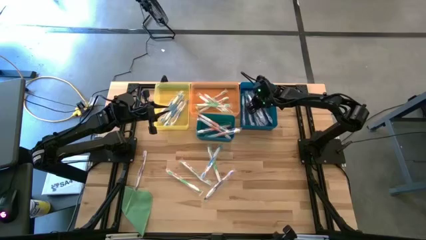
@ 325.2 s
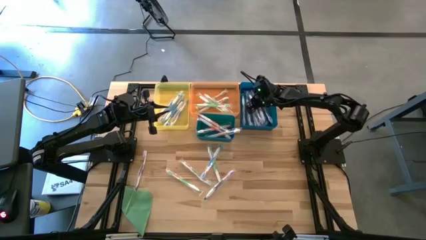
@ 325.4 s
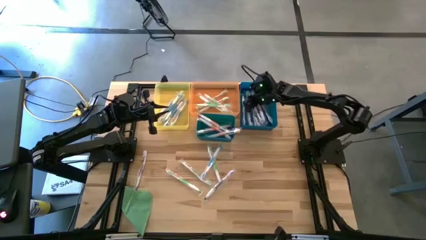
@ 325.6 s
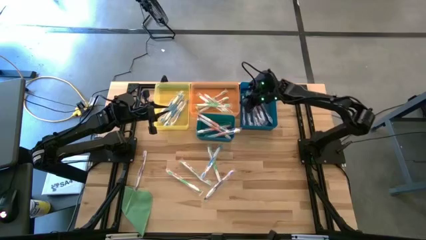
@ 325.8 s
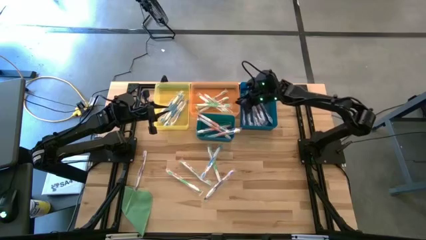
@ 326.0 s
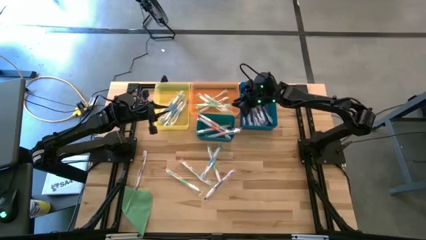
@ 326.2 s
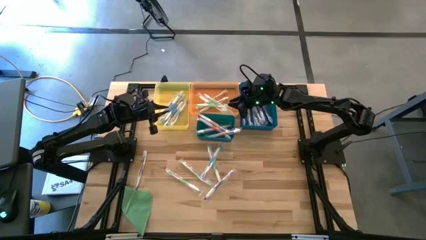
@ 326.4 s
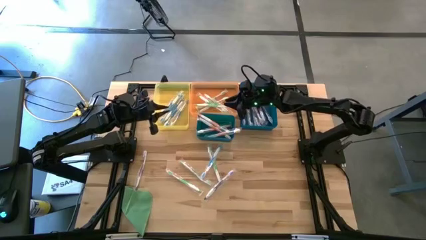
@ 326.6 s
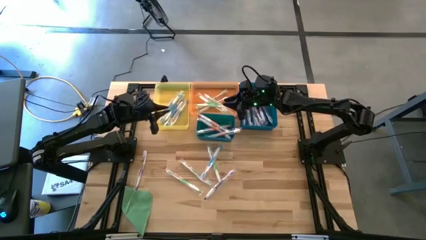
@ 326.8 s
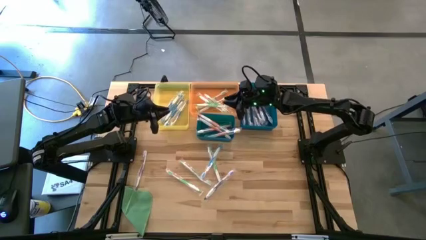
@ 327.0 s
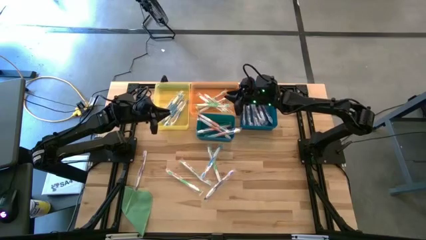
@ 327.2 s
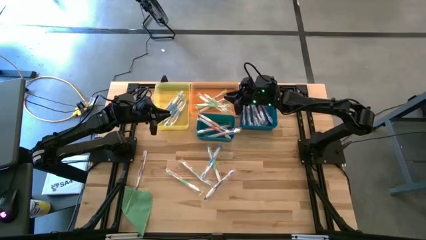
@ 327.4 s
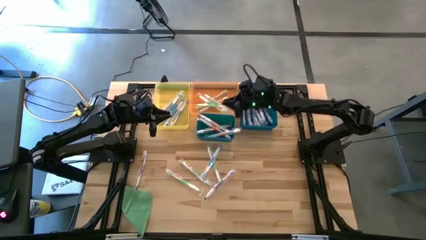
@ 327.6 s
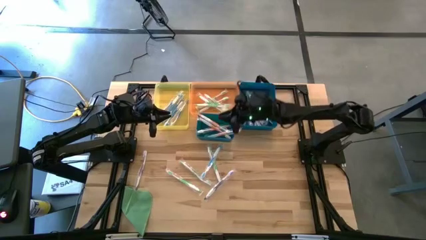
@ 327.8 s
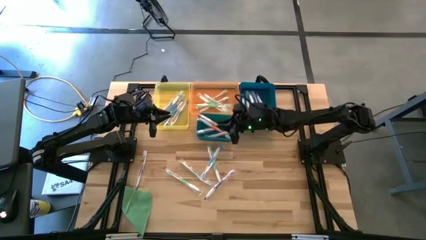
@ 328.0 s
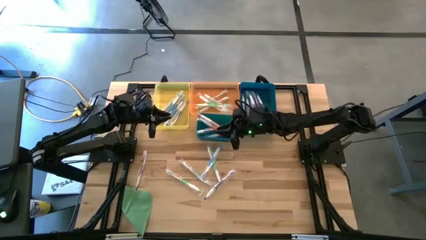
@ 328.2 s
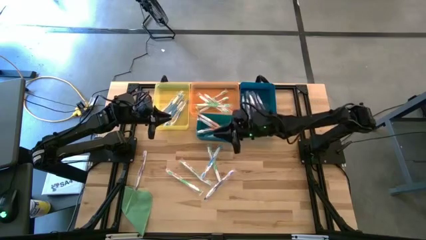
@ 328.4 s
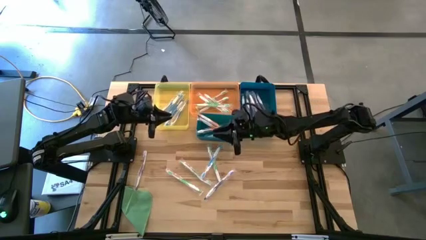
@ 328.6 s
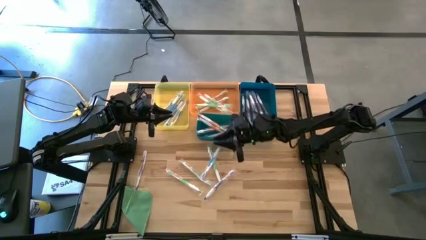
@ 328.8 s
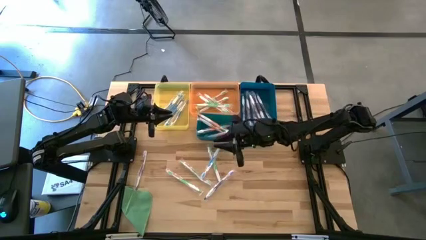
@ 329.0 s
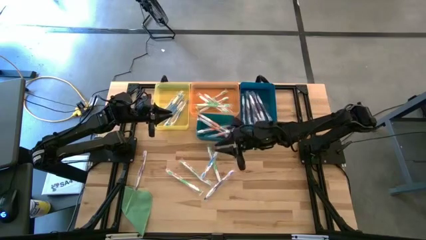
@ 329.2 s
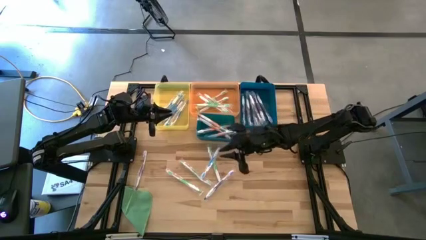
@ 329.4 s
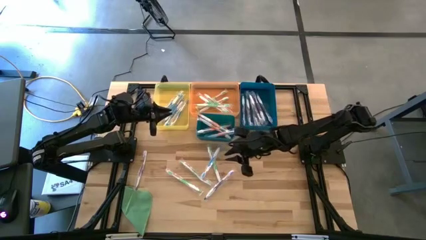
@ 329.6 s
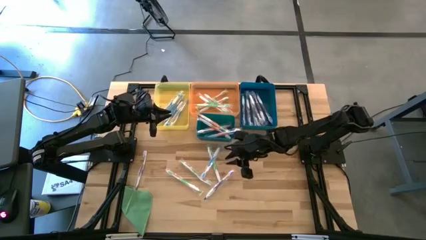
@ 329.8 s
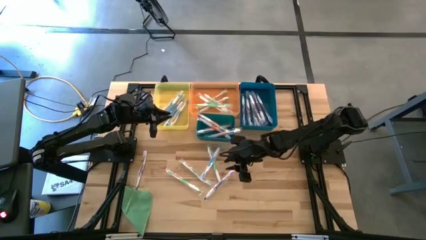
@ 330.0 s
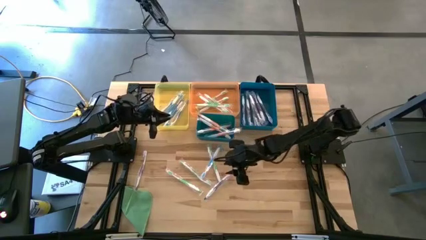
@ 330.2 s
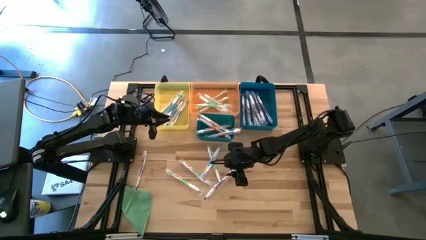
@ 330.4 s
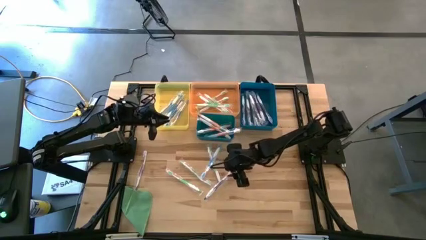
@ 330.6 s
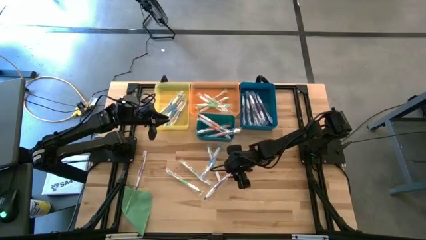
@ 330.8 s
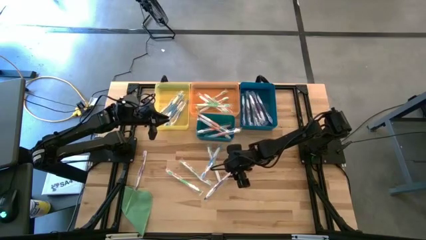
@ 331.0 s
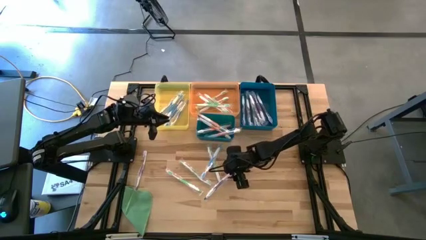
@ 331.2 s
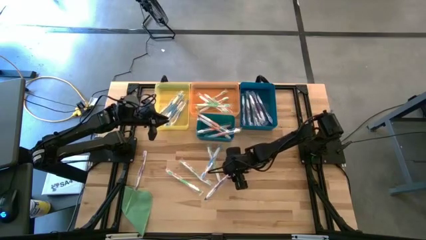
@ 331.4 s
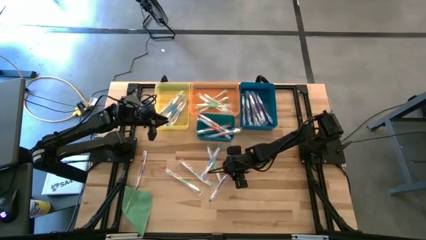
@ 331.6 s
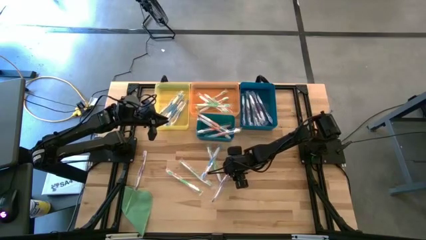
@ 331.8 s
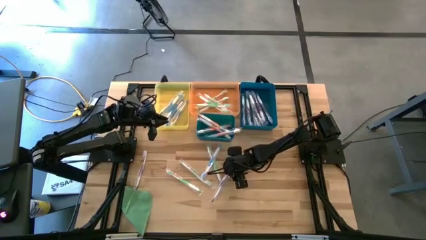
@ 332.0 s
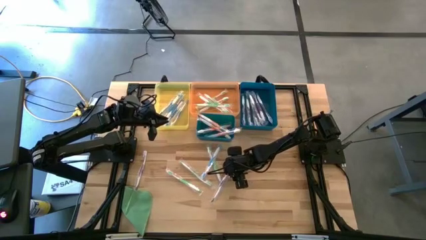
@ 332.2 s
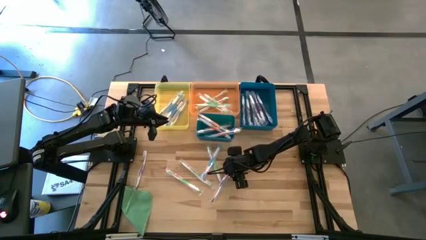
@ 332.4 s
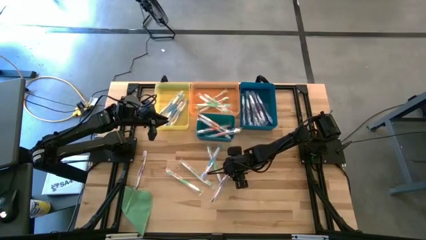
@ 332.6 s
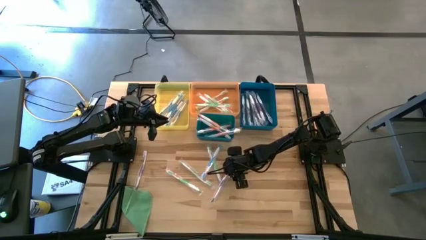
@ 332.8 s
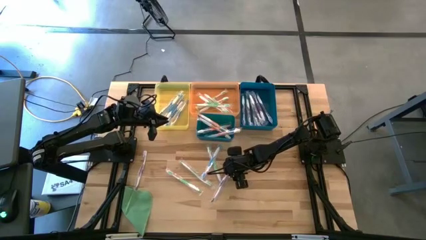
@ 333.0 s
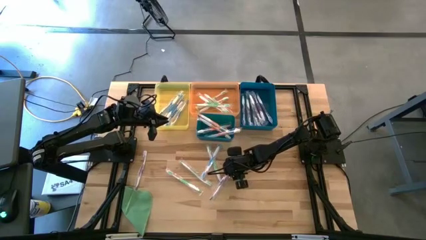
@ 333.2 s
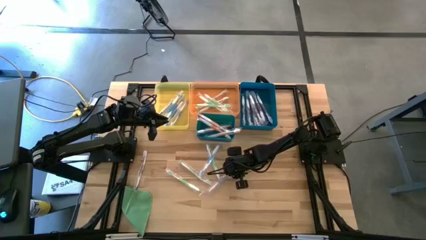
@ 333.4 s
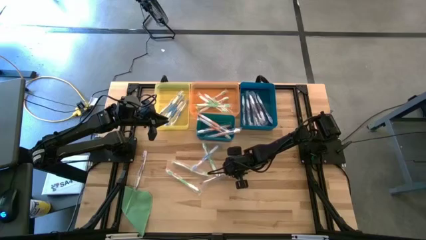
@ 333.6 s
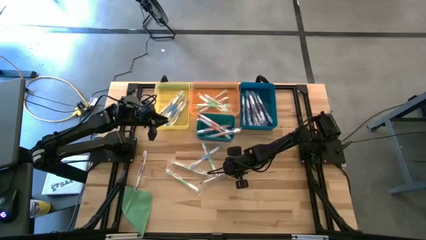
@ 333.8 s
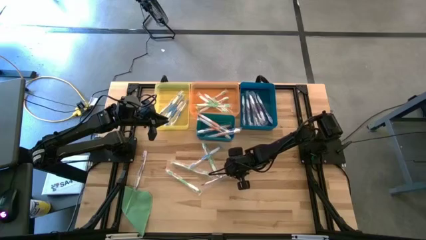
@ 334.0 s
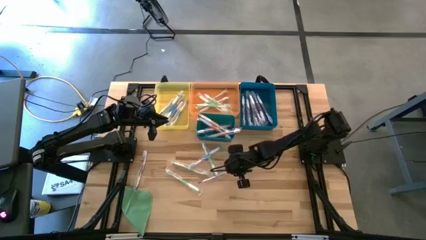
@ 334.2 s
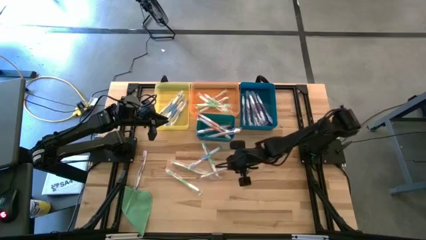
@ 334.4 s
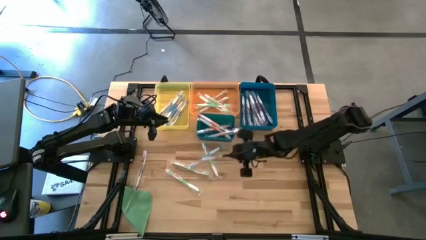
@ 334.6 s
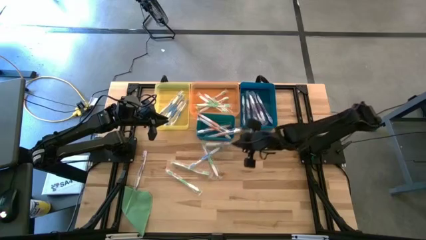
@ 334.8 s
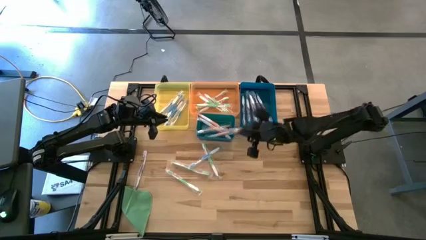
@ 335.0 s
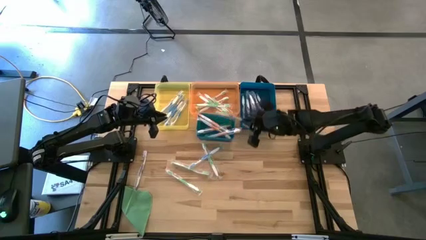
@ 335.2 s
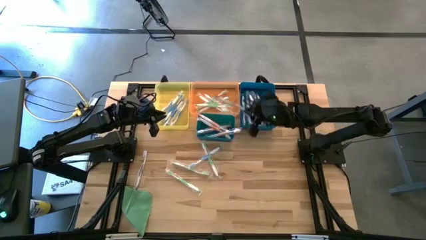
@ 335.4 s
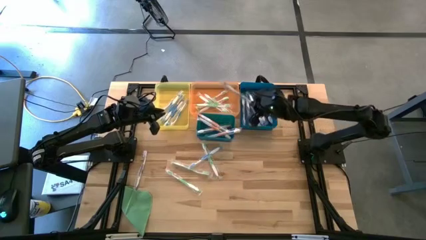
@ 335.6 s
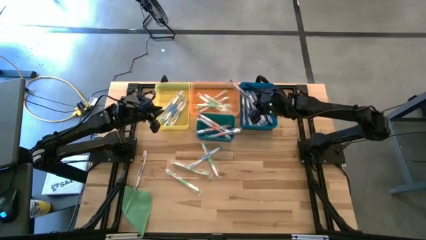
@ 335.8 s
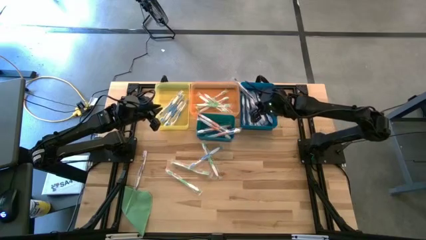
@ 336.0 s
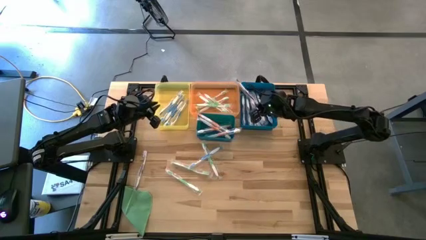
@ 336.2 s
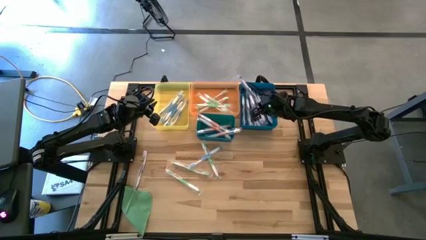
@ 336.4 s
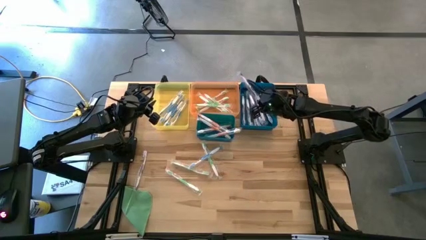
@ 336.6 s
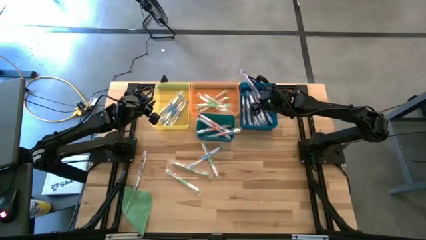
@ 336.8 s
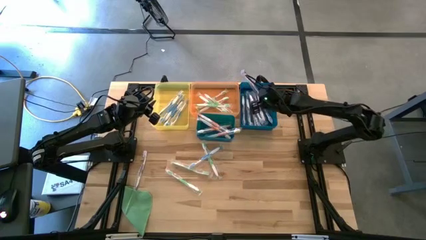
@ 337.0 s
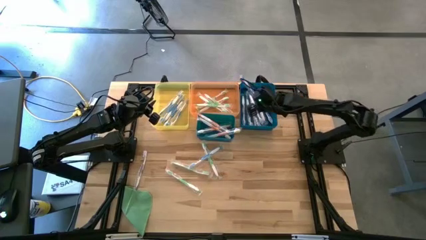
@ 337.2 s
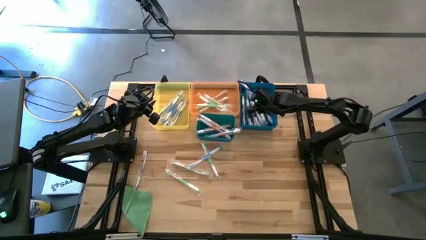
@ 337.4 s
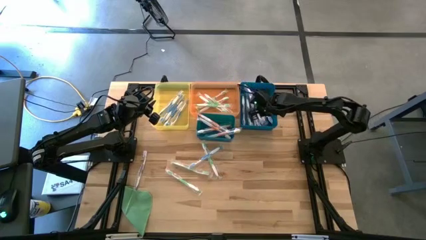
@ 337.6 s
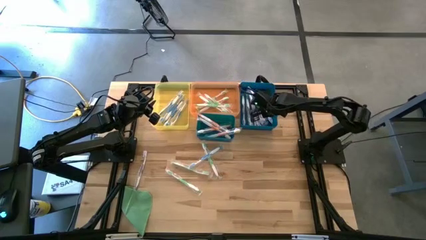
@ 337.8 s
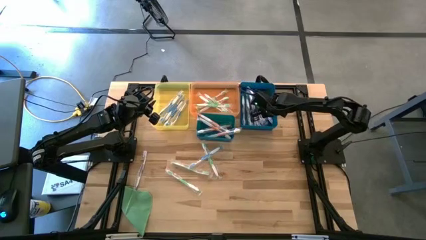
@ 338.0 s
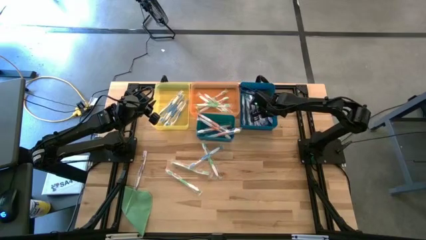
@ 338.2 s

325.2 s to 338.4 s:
Task: Pick & Place Toothbrushes
Put the purple toothbrush into the blue bin
